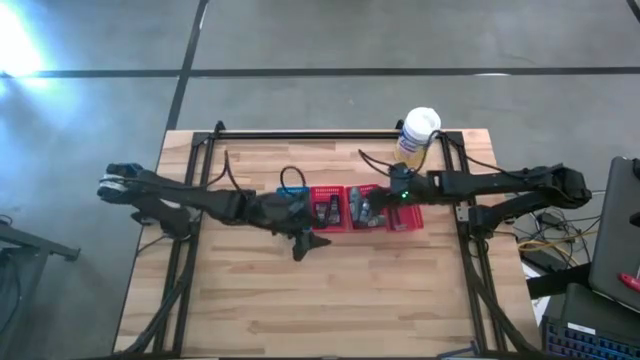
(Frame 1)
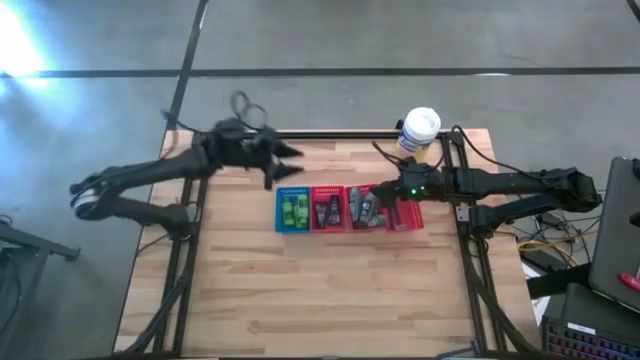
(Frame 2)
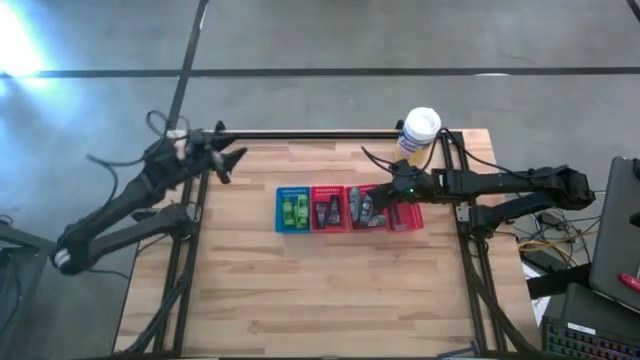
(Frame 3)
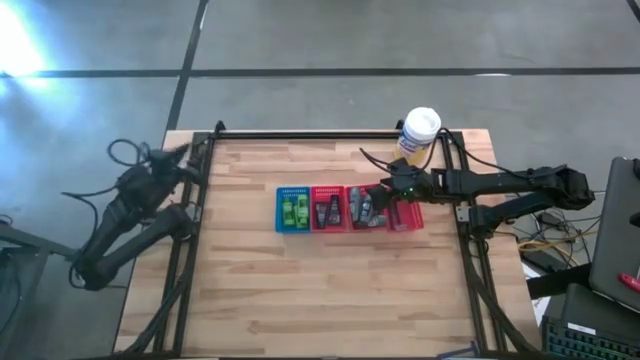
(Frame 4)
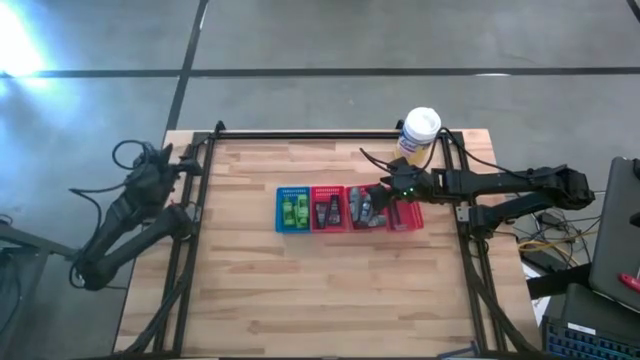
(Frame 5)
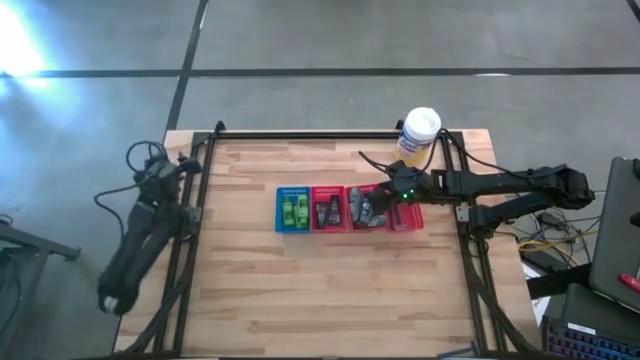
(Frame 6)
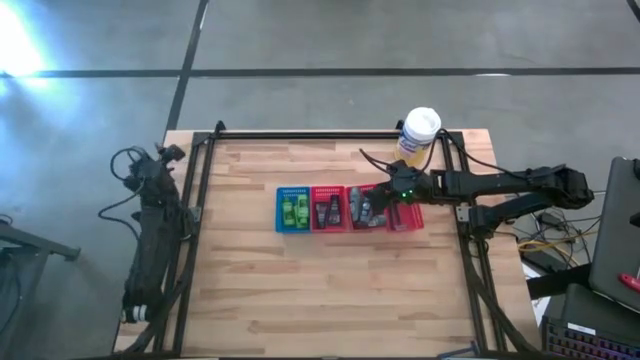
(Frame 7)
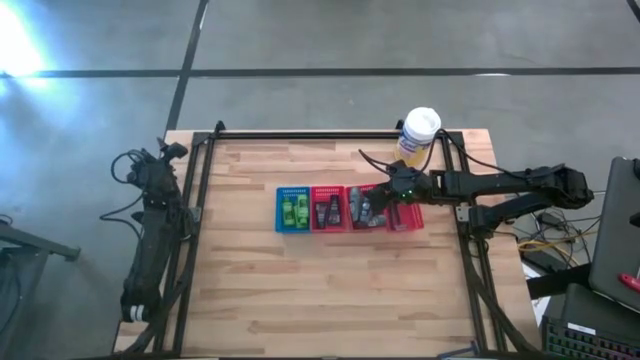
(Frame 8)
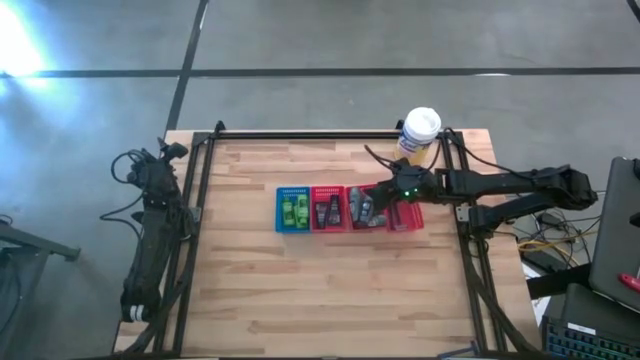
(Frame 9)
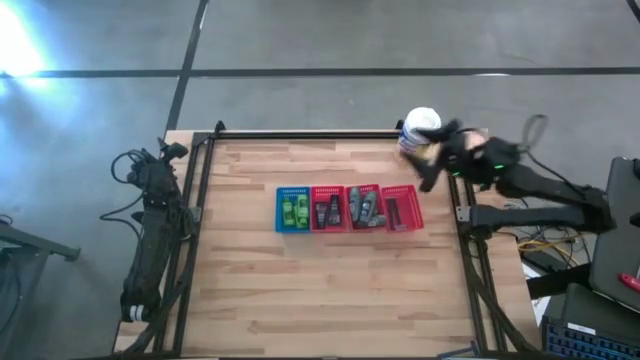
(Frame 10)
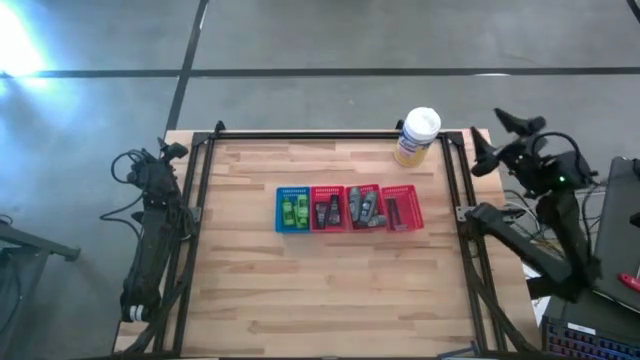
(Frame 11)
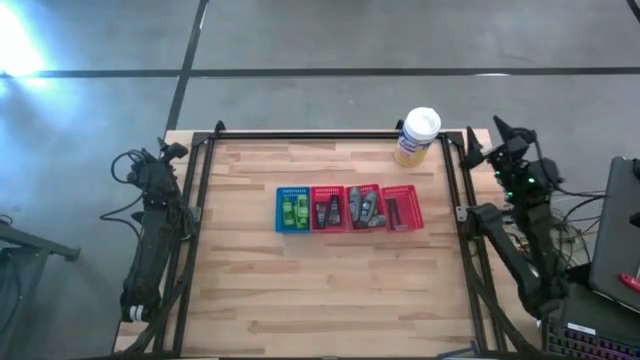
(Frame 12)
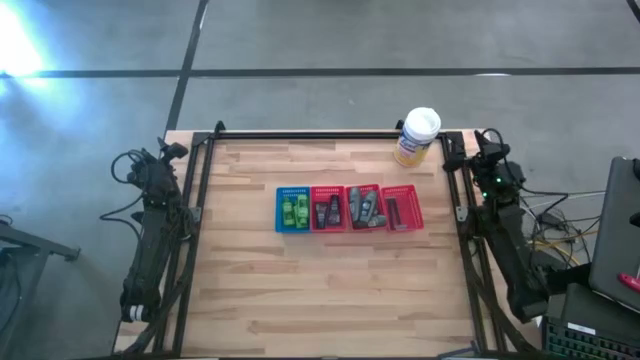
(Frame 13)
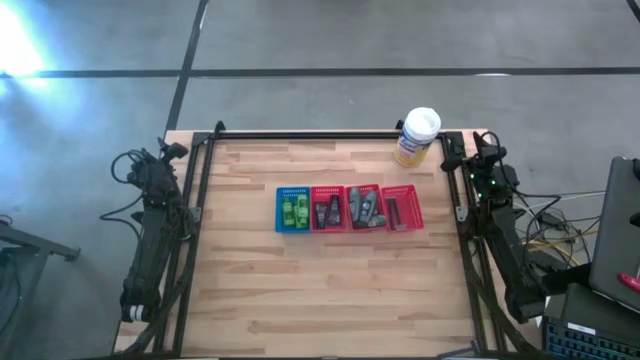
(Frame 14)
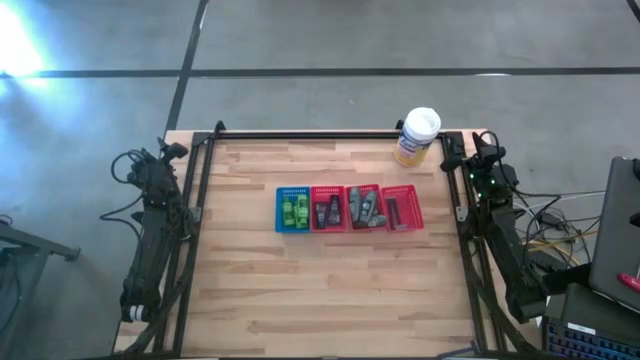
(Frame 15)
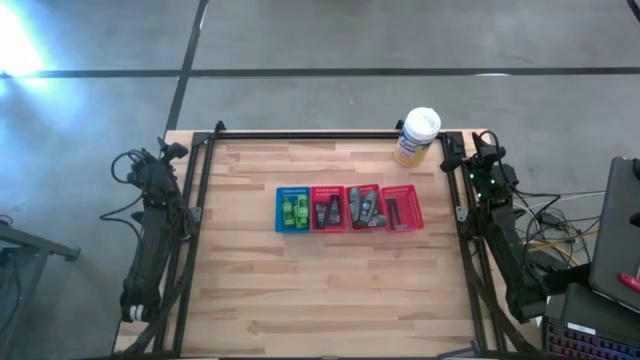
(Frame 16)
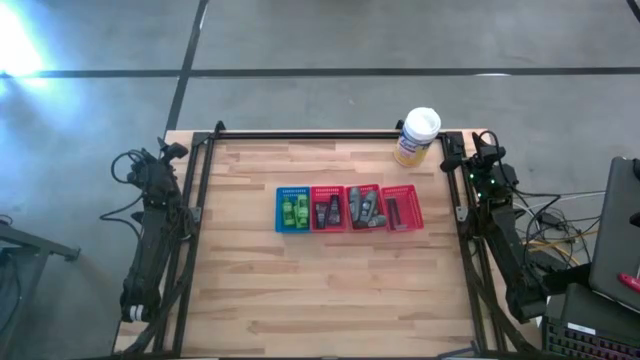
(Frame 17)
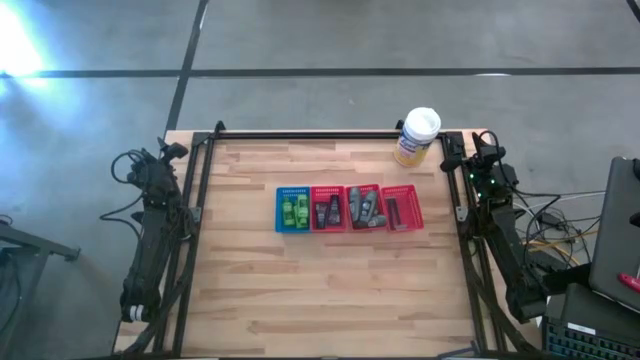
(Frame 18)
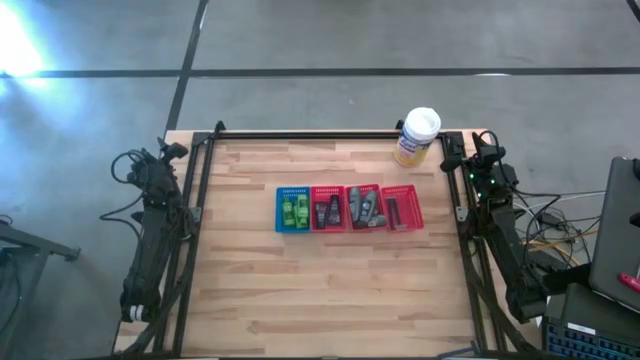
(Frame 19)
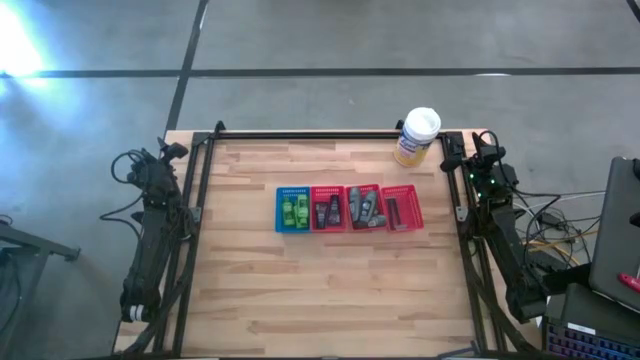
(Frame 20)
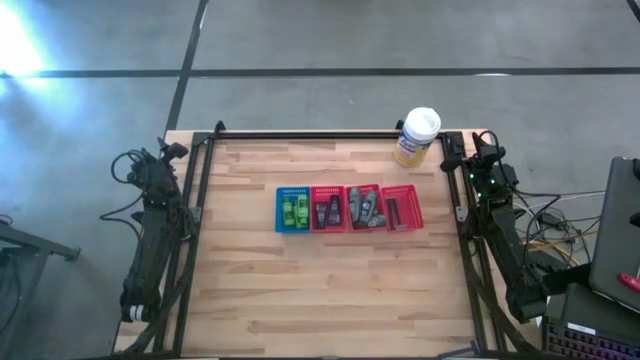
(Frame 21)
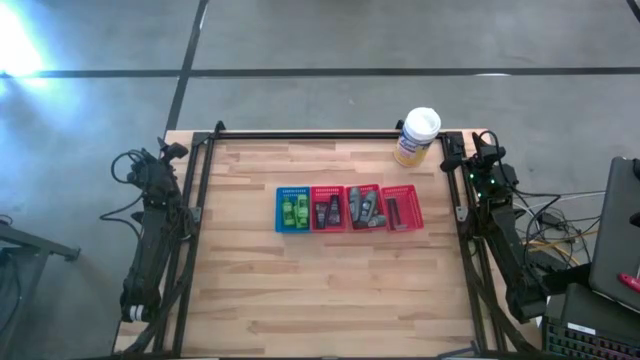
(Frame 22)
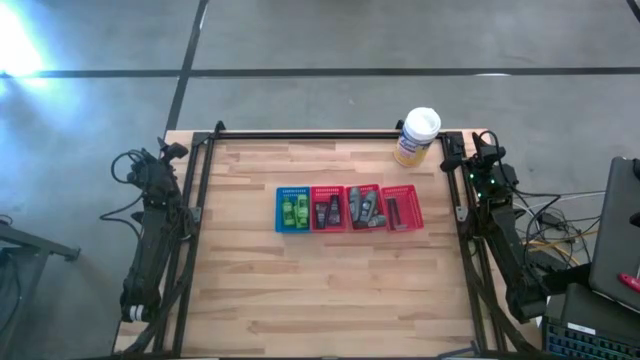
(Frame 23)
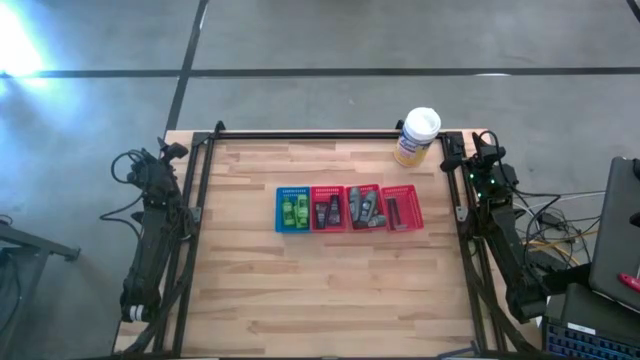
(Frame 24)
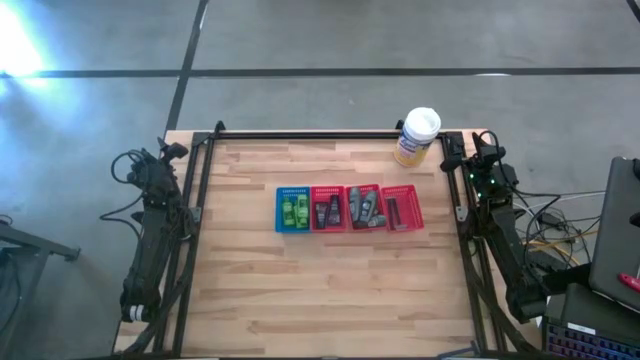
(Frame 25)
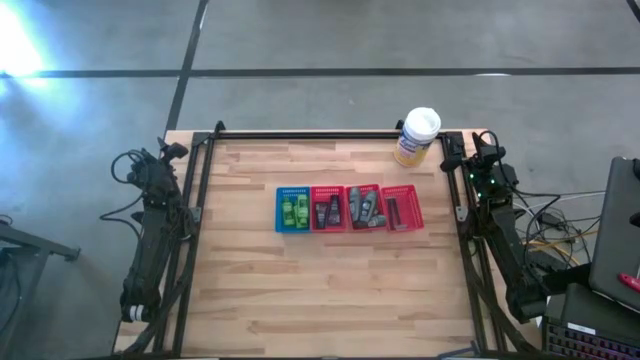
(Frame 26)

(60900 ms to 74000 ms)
Task: Pick & Place Travel size toiletries
Return to Home Position

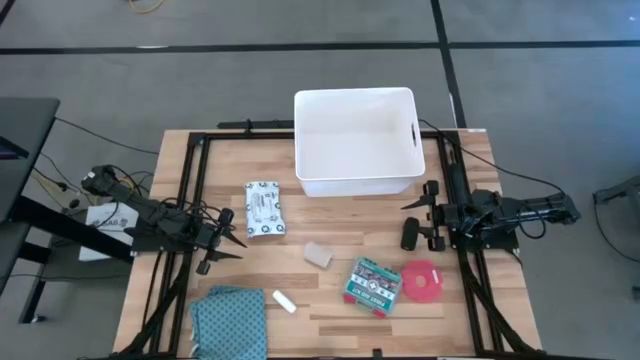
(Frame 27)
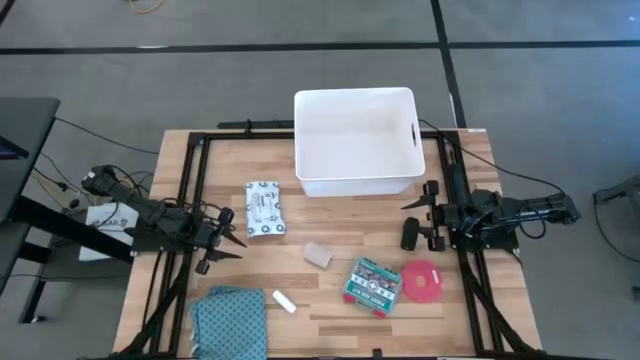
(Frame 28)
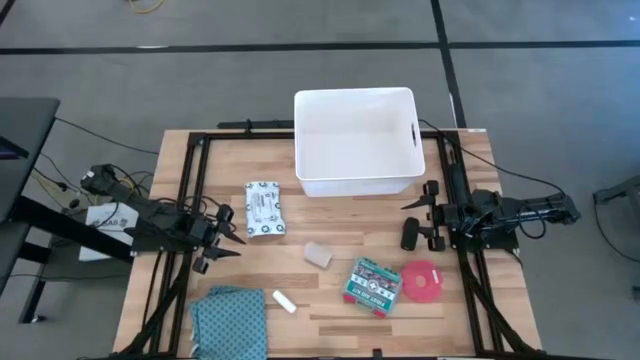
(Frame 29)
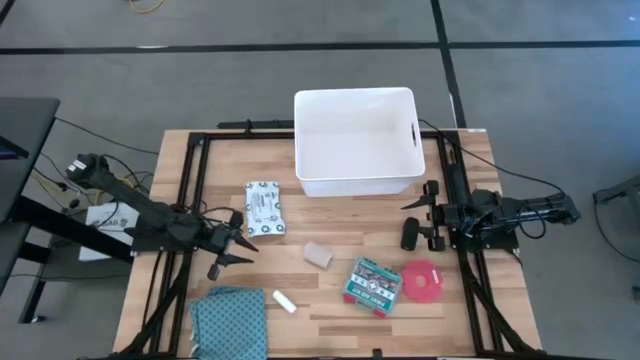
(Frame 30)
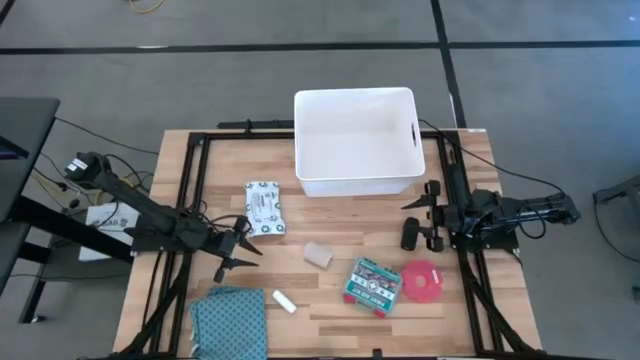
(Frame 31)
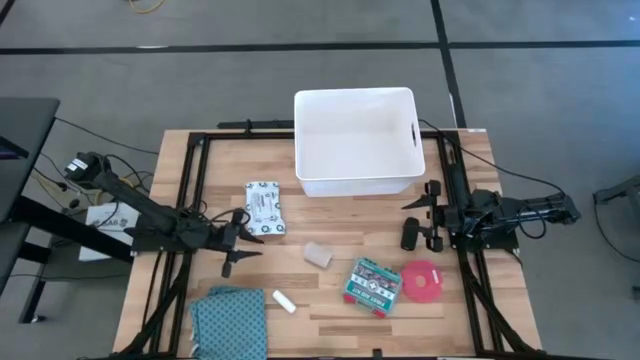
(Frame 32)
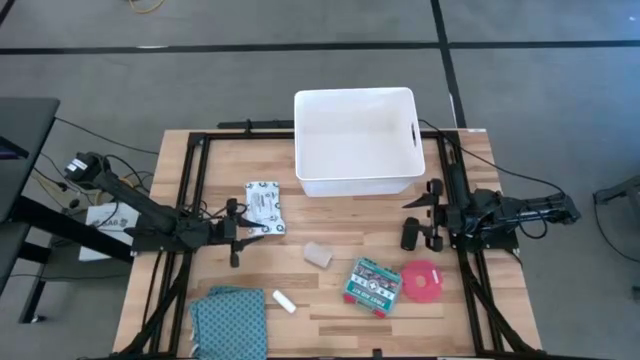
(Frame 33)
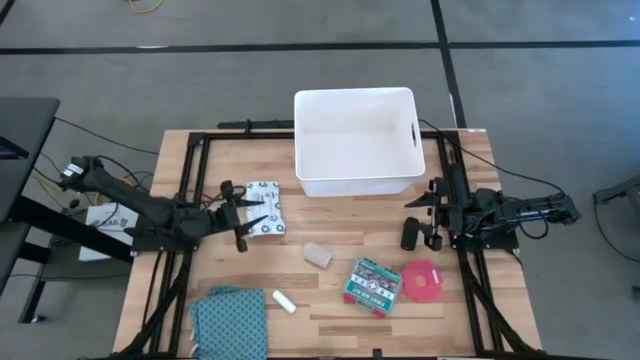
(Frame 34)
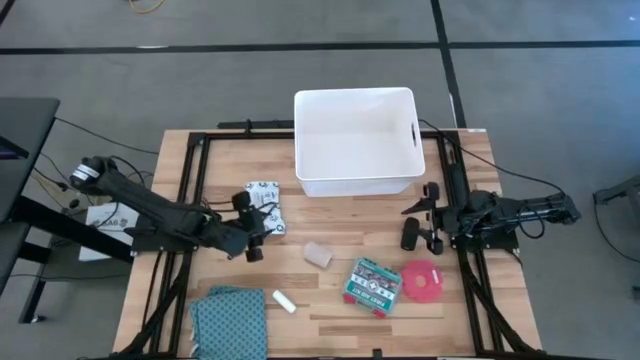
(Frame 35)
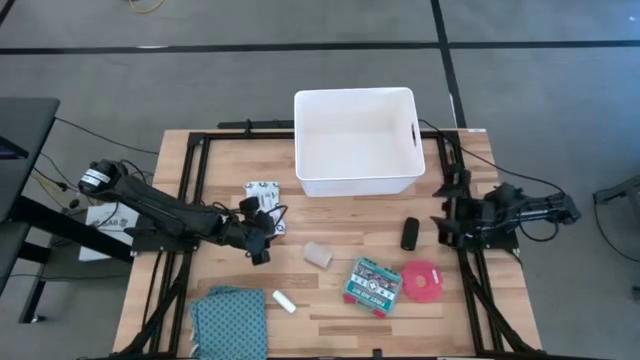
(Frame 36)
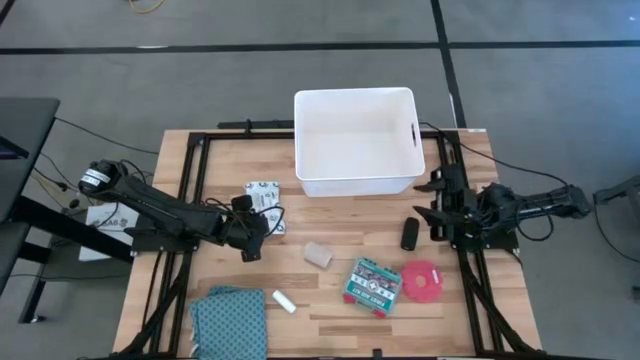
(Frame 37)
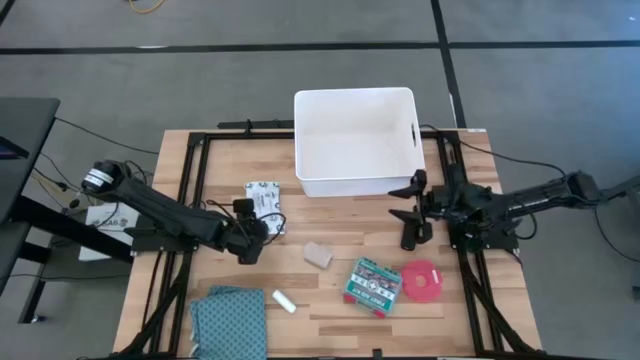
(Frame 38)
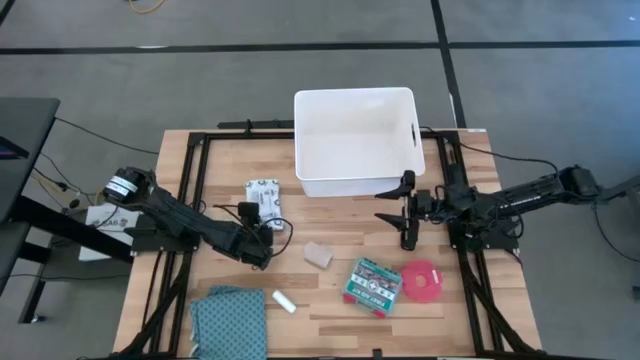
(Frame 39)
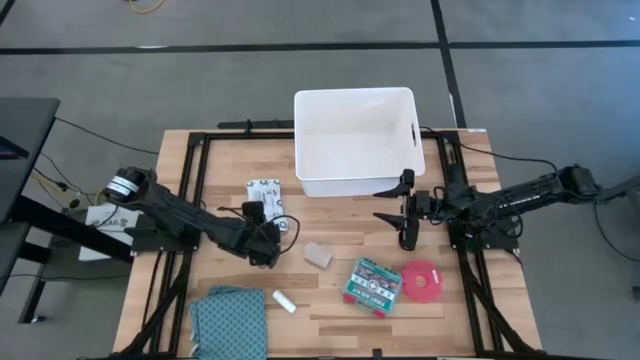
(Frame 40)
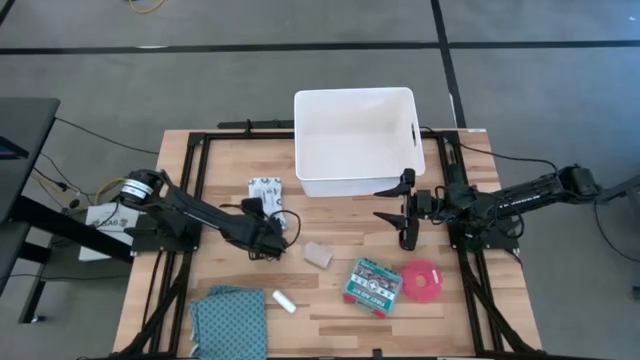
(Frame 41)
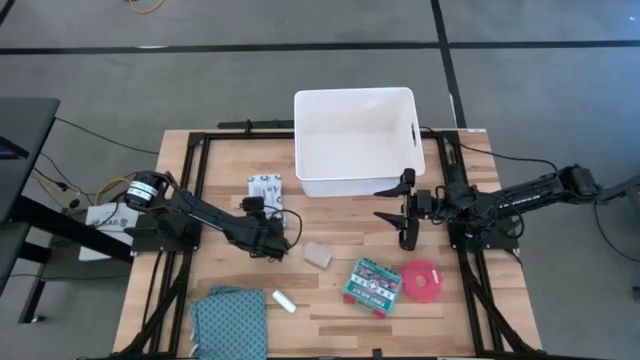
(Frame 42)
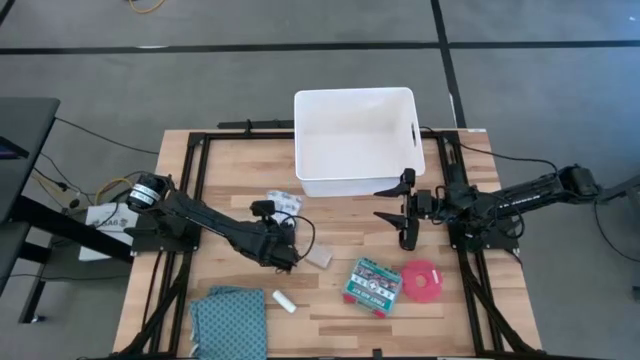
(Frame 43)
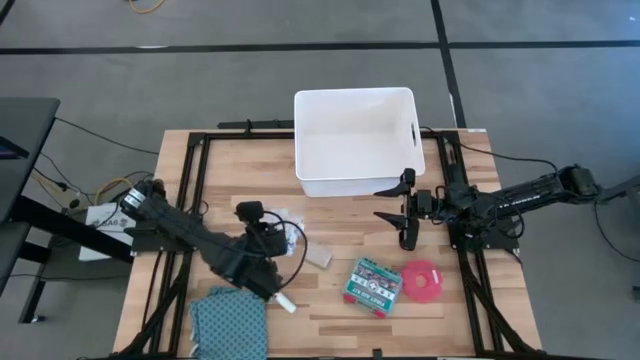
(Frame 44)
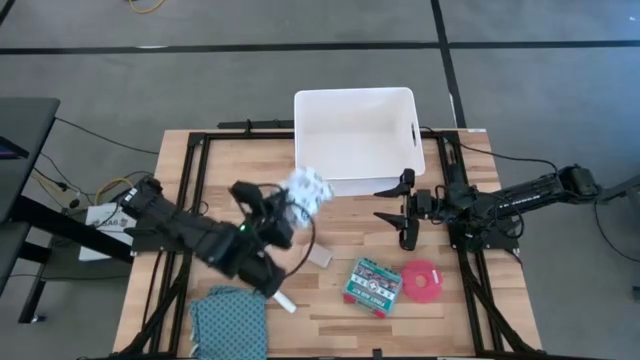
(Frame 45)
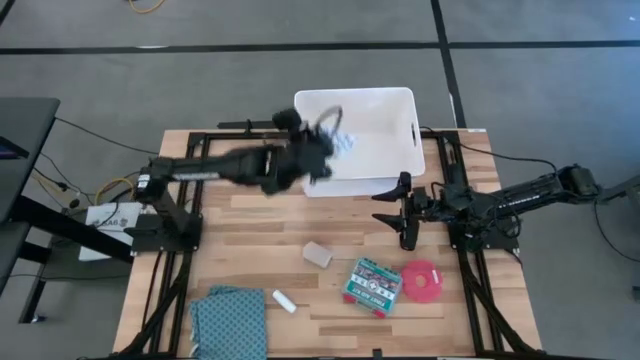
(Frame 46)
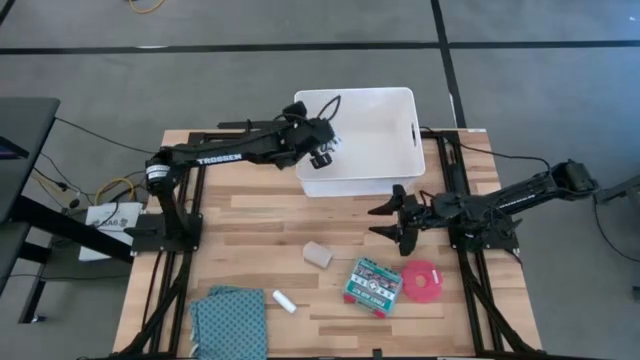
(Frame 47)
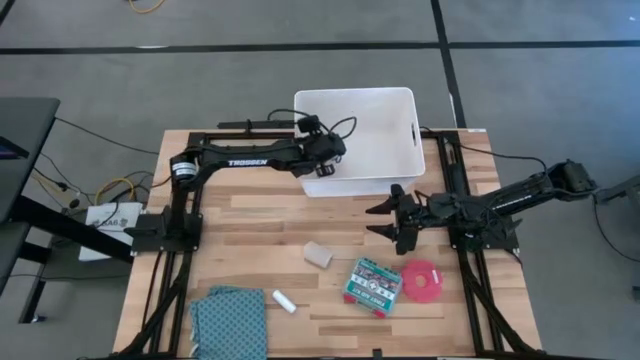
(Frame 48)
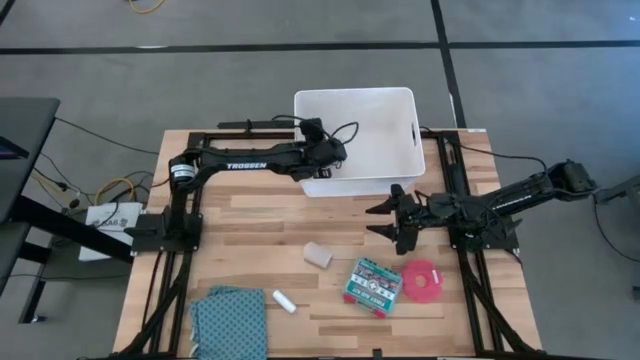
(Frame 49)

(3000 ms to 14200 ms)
Task: Pick & place medical supplies in basket/bin
Put the white mailer bag into the white bin
